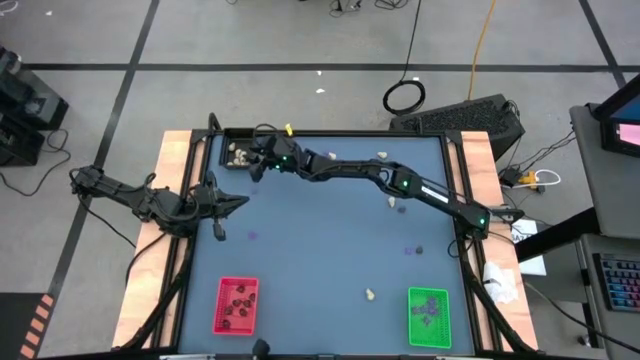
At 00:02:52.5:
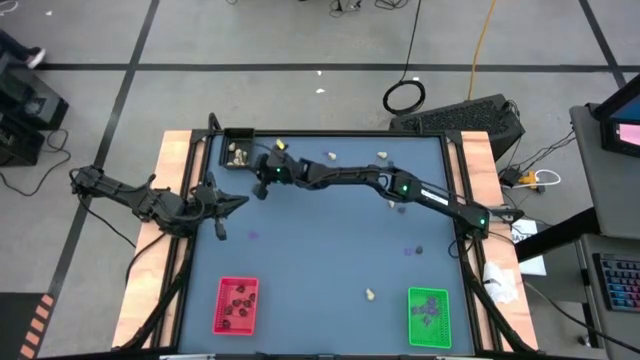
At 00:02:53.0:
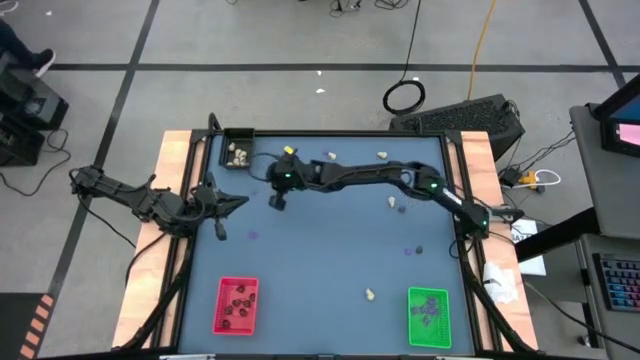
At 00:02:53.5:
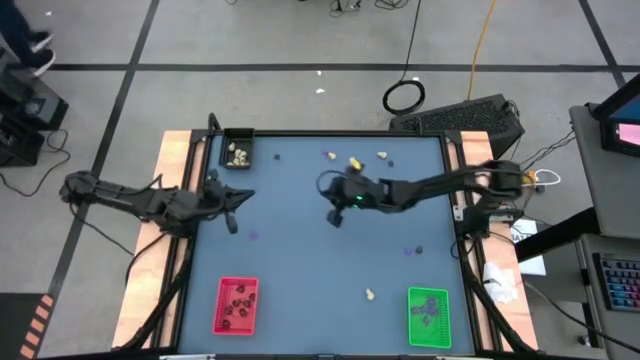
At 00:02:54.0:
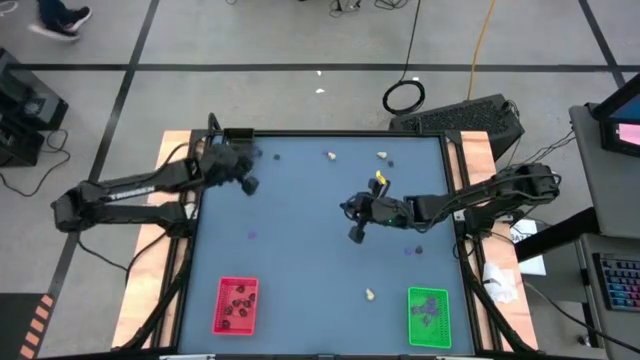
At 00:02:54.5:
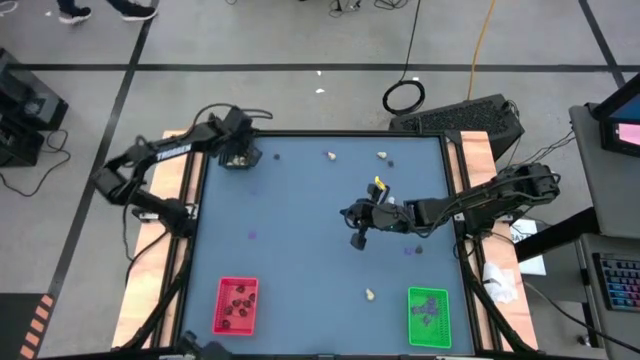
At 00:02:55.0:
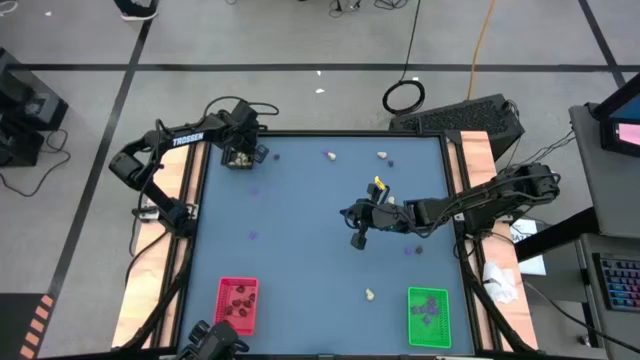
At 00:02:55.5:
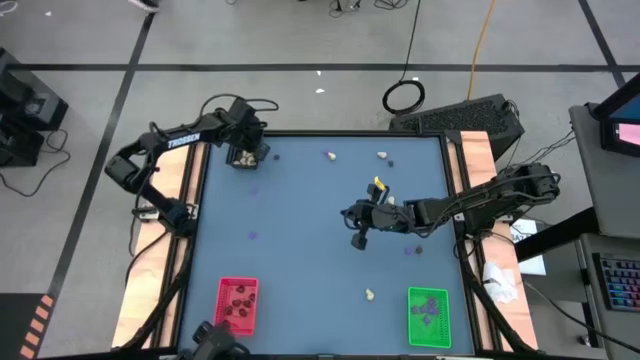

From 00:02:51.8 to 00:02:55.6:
Task: Sort Halloween decoration
Adjust the black bin

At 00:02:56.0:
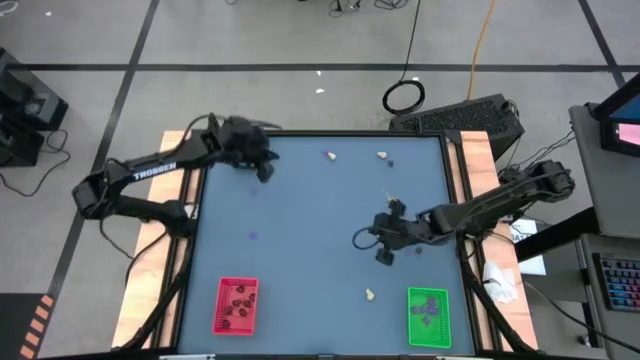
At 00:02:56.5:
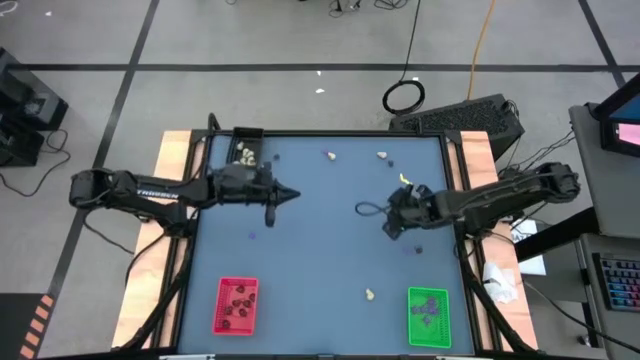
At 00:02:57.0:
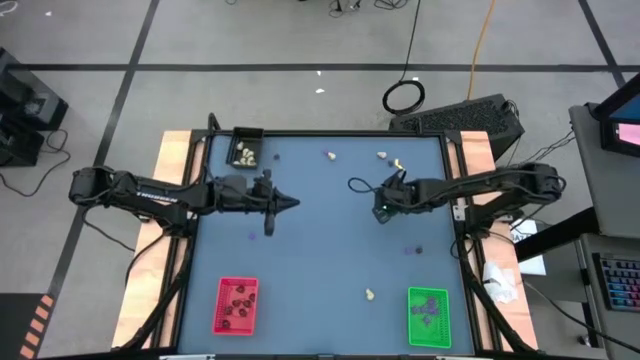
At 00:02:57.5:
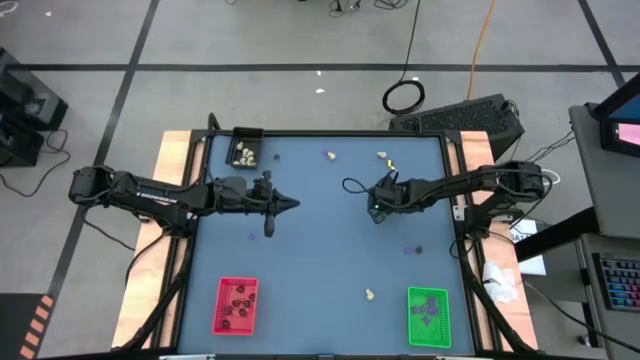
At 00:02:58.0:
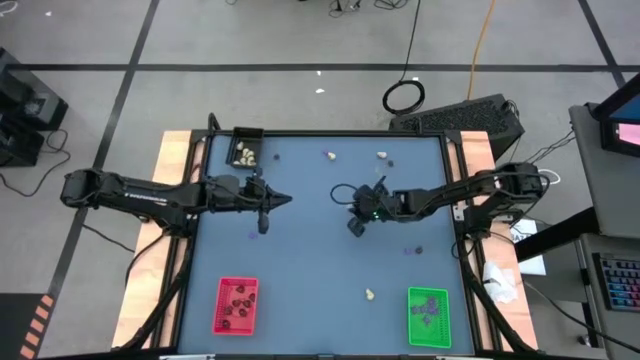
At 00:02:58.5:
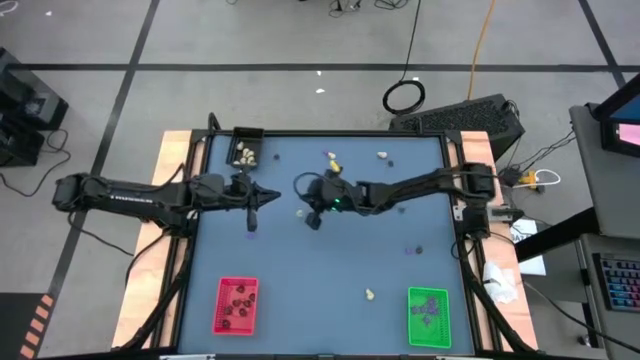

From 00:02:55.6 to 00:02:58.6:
Put the white skull toy into the black bin

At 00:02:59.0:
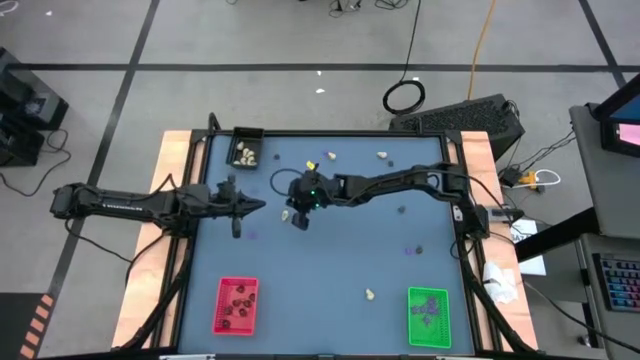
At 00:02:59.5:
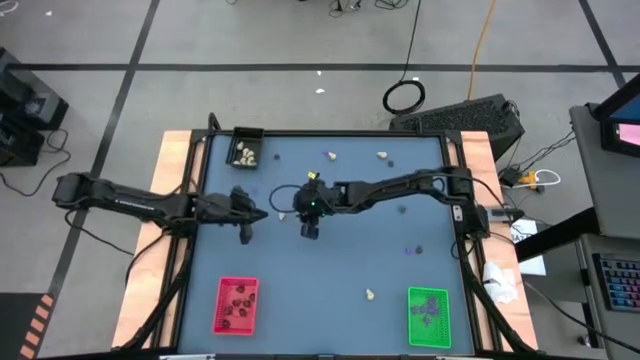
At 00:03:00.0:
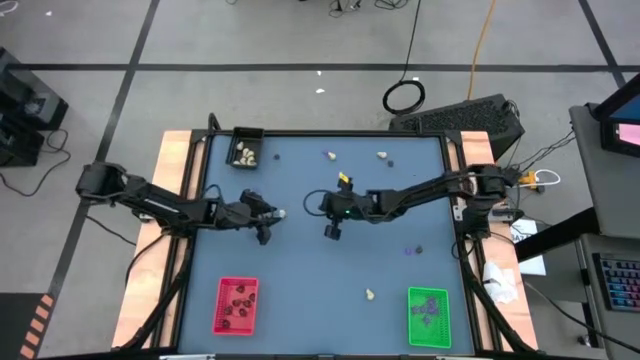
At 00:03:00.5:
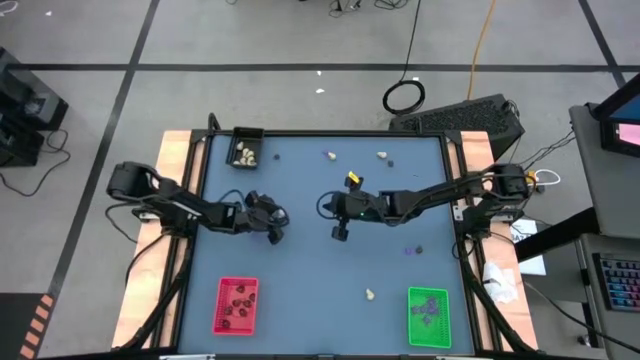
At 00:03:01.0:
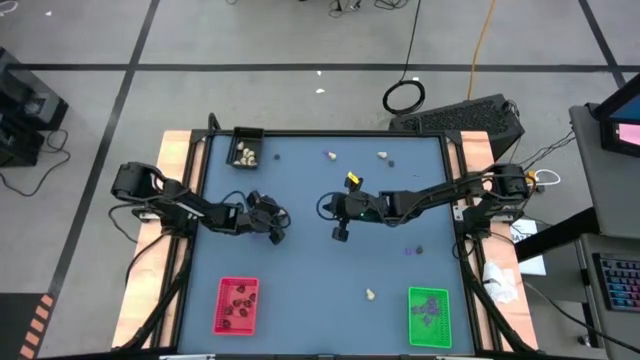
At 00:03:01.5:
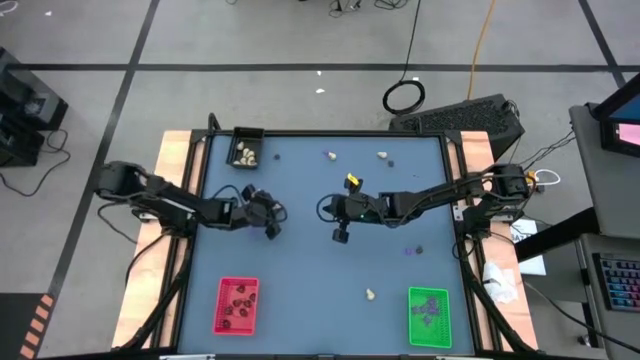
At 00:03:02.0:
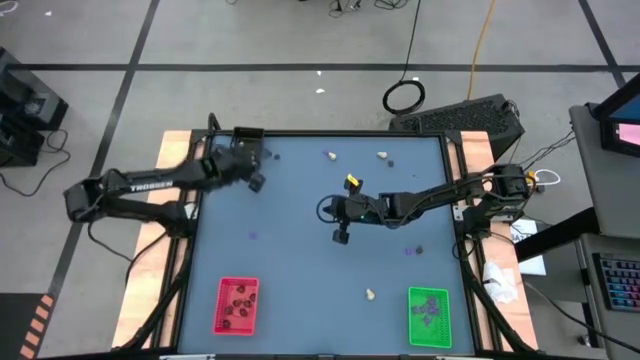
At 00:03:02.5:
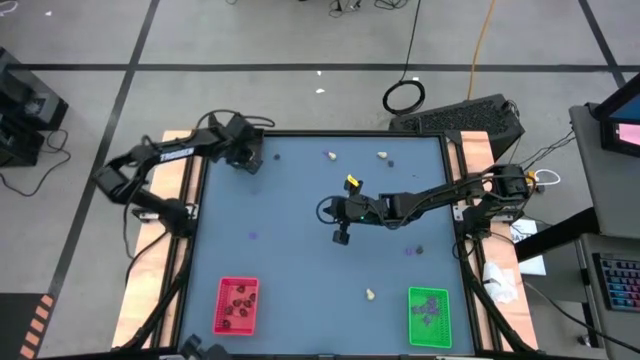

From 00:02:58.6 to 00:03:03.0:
Put the white skull toy into the black bin

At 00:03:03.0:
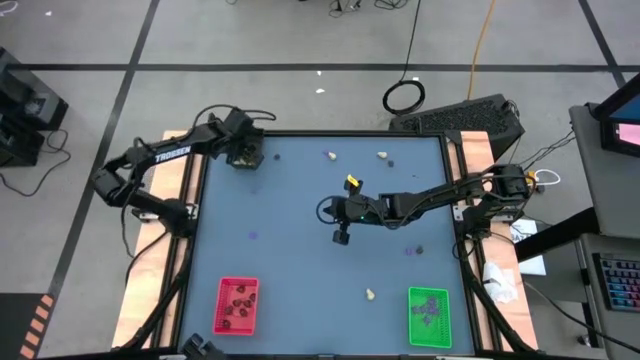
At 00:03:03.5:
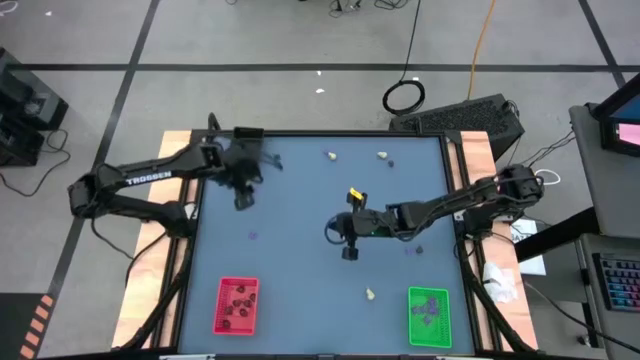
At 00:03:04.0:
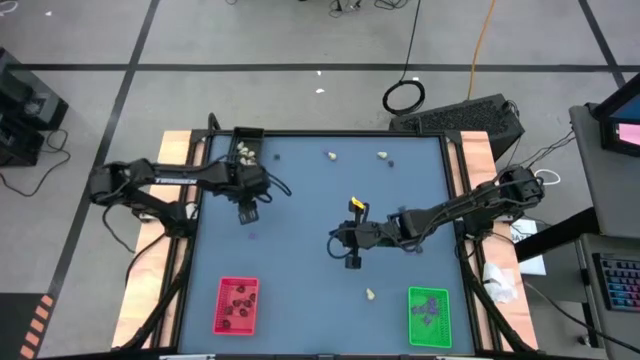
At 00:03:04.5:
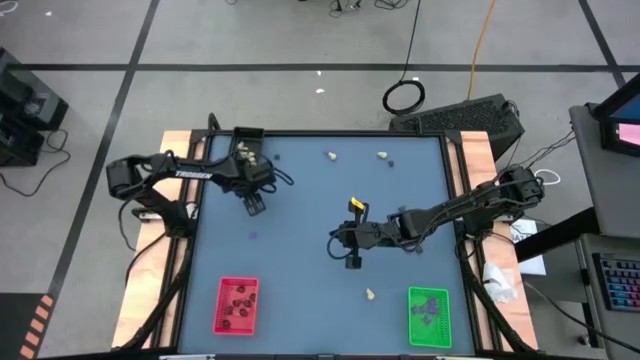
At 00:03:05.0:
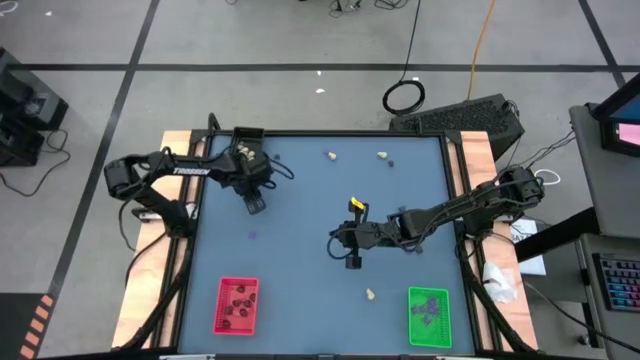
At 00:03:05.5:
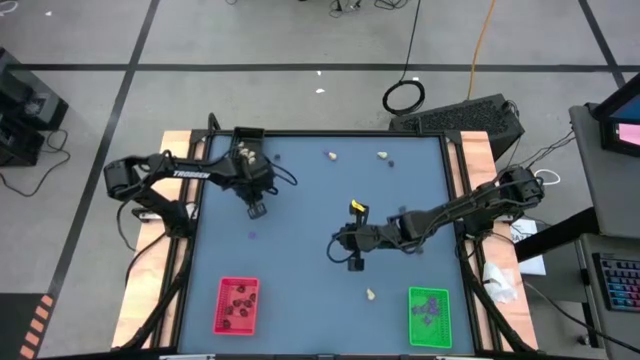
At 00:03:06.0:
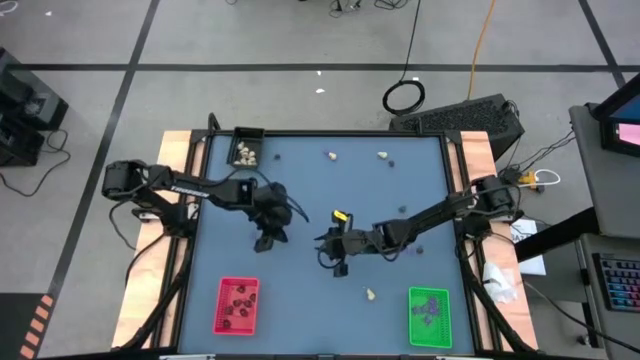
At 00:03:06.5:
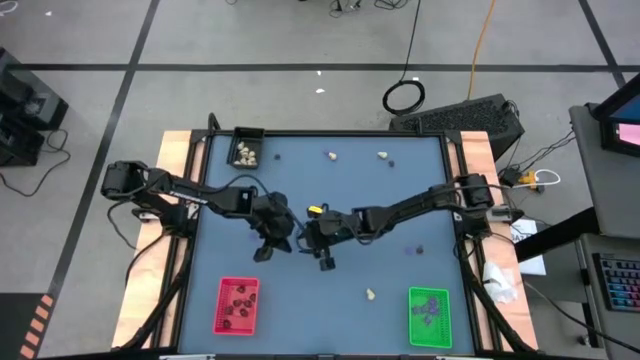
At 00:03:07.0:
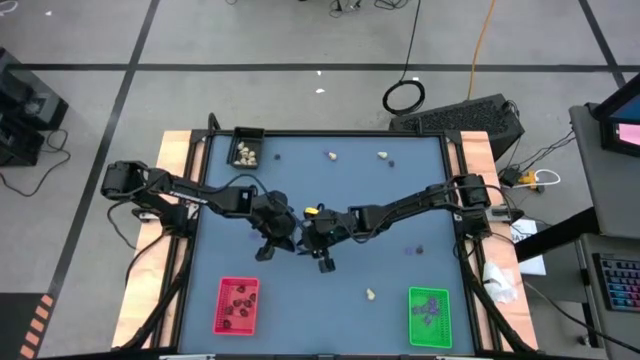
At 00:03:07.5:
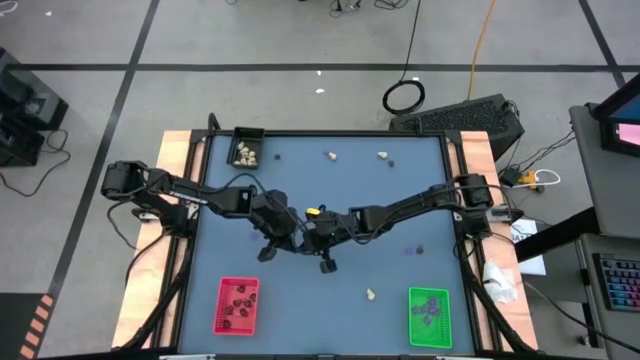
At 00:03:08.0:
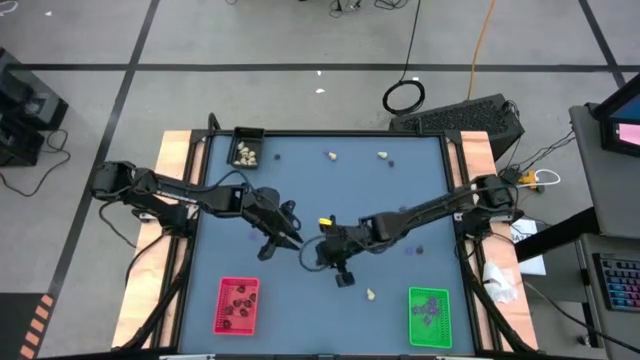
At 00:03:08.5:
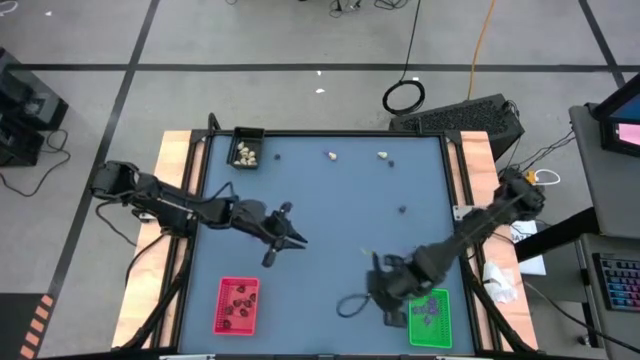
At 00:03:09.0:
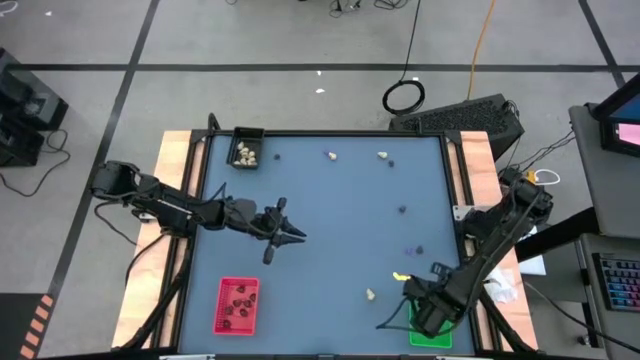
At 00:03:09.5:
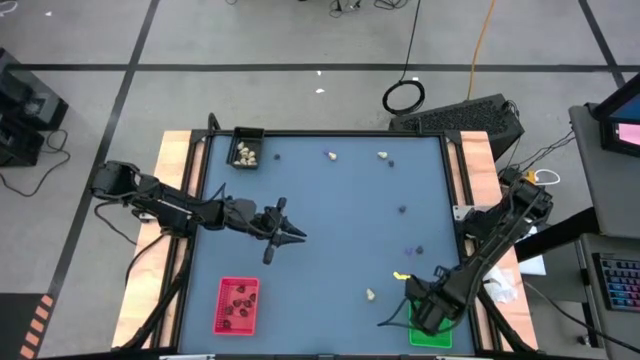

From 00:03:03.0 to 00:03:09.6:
Put the violet spider toy into the green bin

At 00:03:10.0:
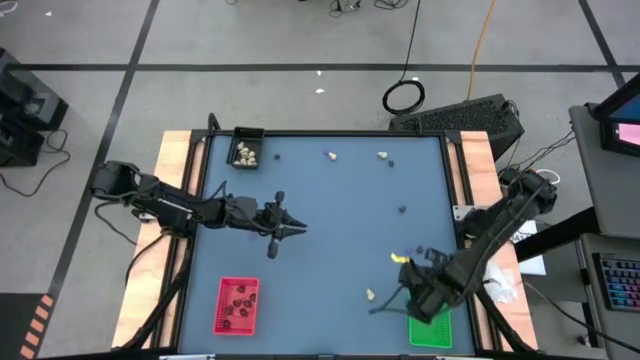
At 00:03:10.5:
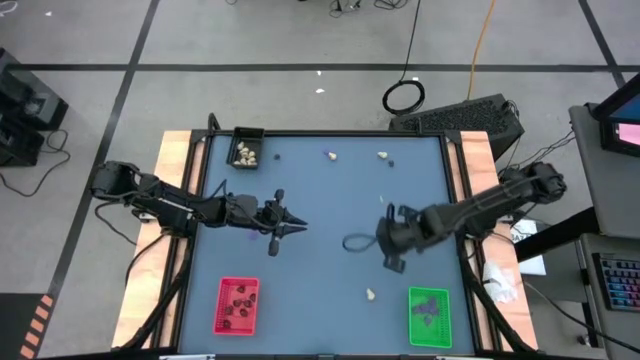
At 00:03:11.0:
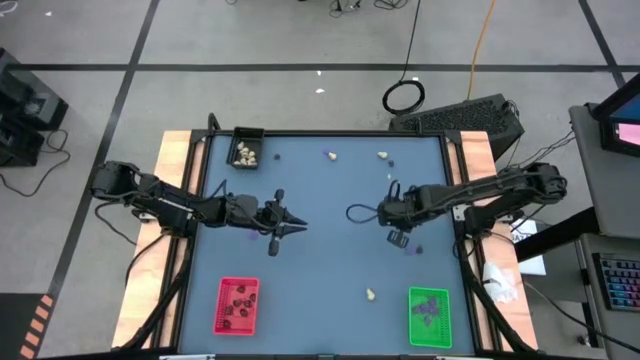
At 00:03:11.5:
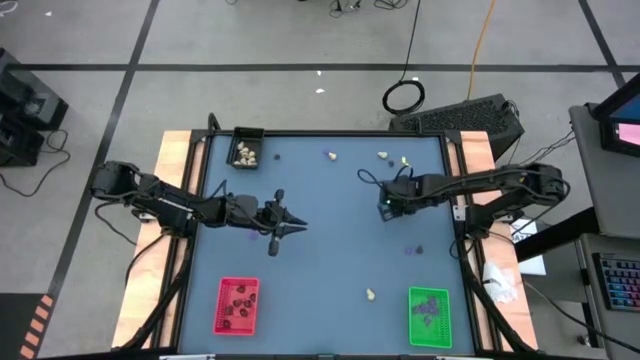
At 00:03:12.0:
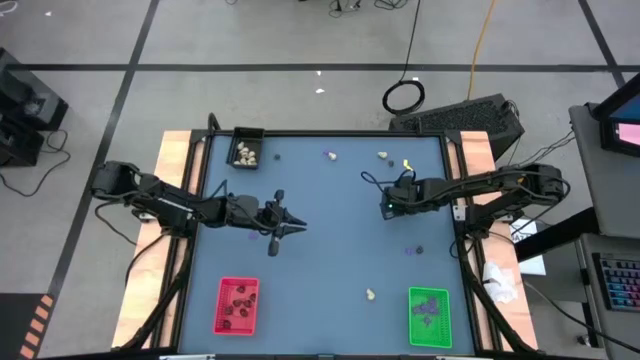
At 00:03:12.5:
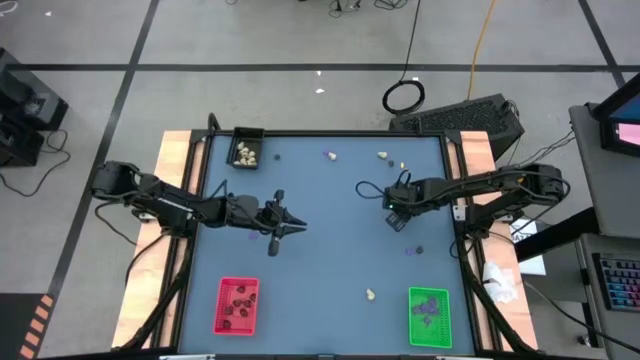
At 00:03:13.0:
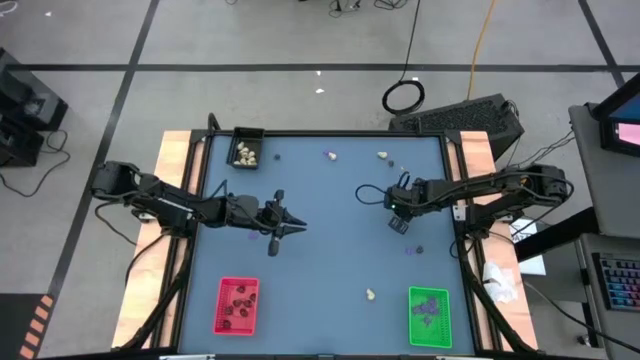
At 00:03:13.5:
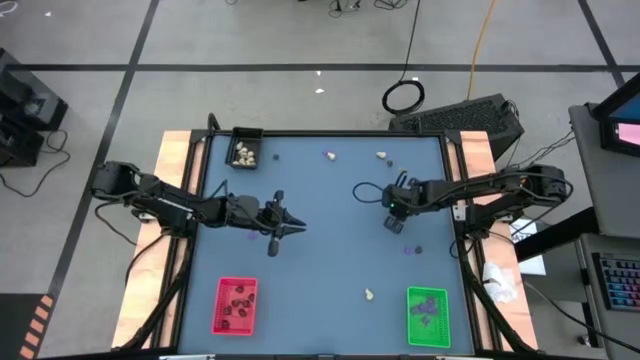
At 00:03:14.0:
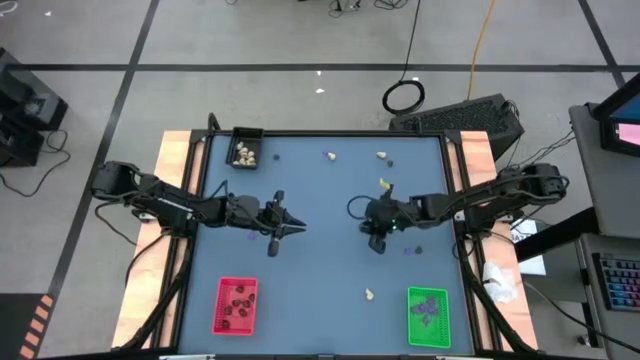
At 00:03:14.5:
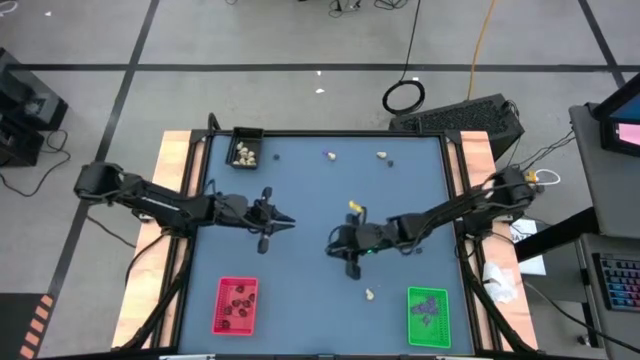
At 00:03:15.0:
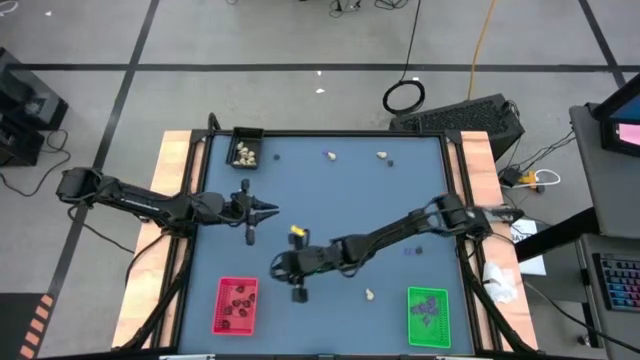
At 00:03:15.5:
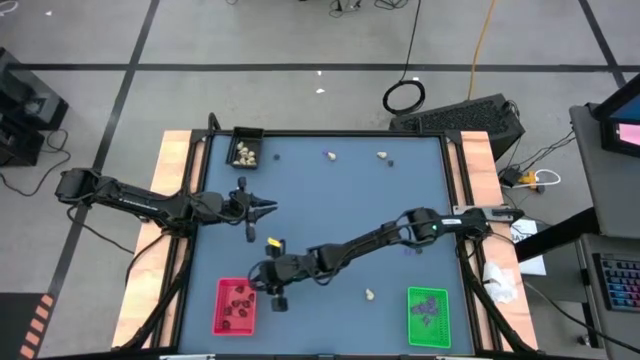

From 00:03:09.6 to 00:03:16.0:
Put the black skull toy into the red bin
